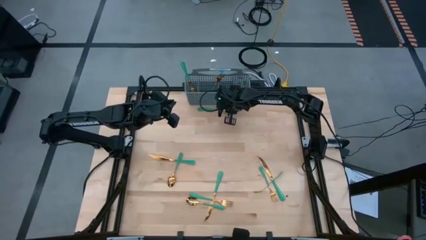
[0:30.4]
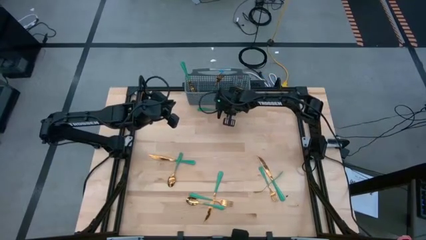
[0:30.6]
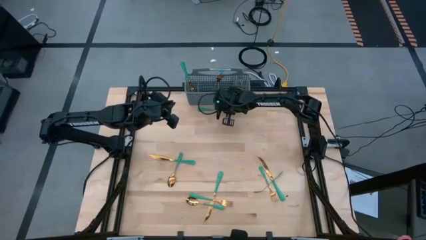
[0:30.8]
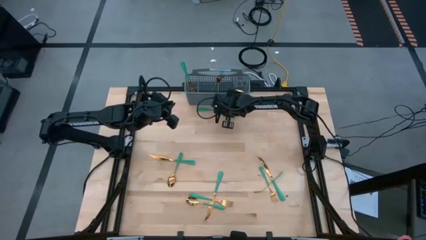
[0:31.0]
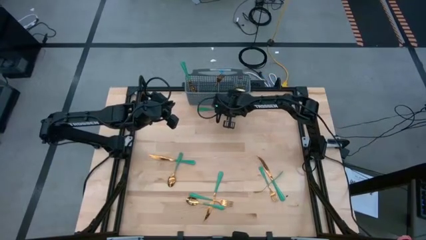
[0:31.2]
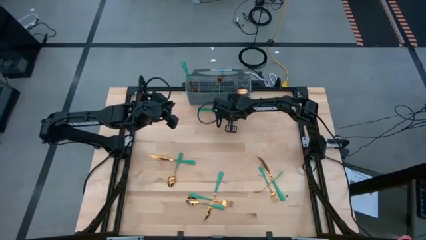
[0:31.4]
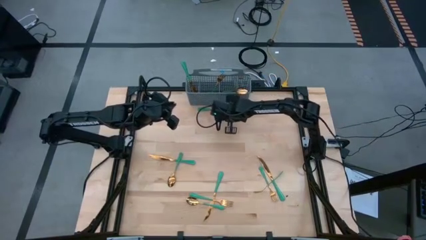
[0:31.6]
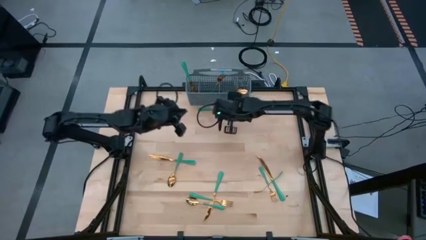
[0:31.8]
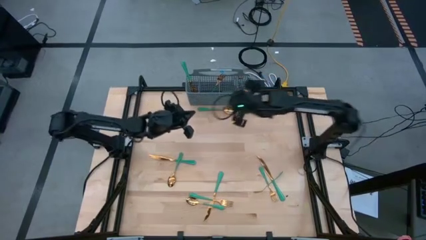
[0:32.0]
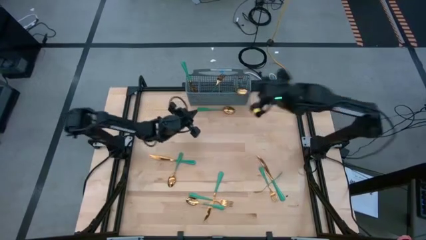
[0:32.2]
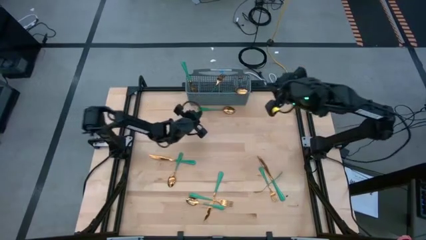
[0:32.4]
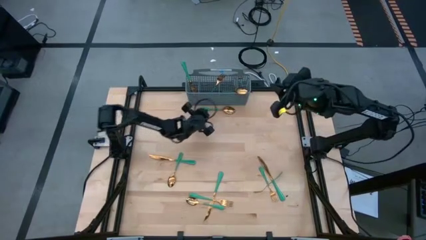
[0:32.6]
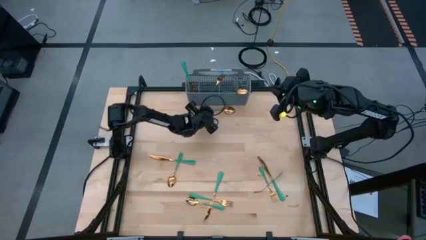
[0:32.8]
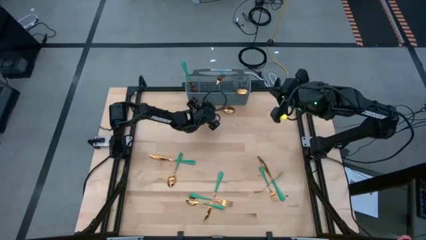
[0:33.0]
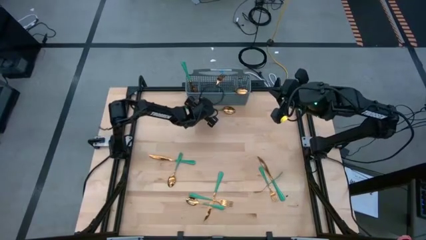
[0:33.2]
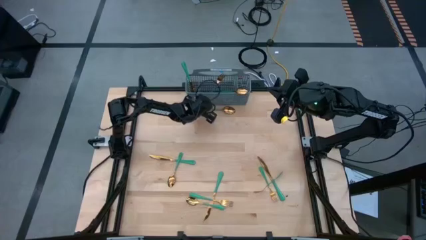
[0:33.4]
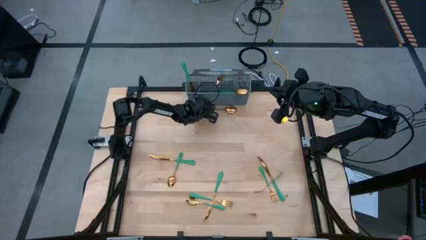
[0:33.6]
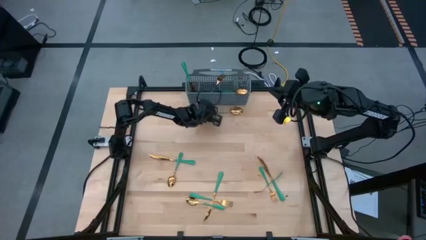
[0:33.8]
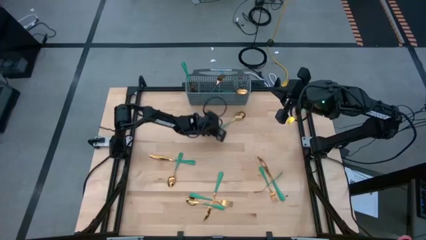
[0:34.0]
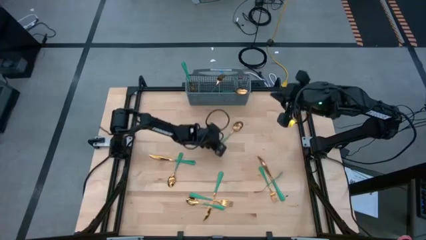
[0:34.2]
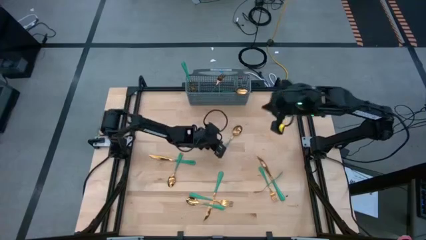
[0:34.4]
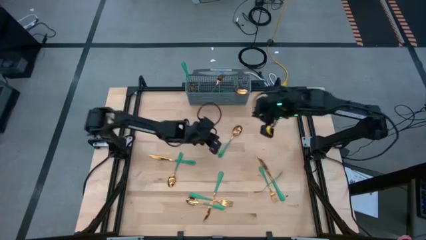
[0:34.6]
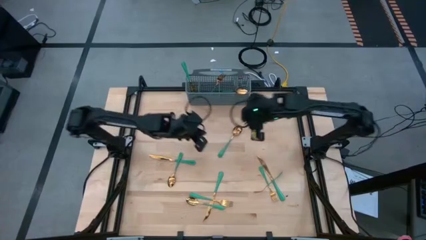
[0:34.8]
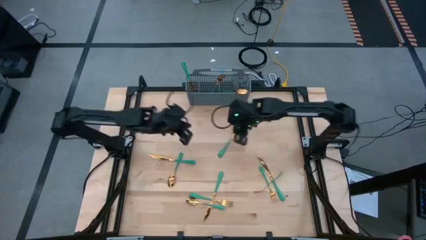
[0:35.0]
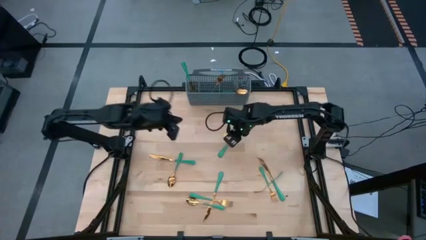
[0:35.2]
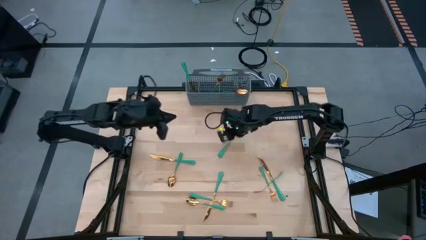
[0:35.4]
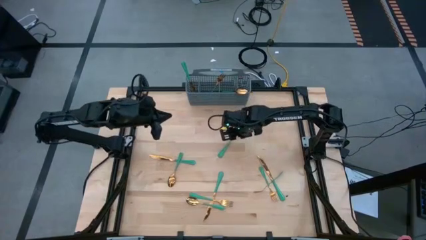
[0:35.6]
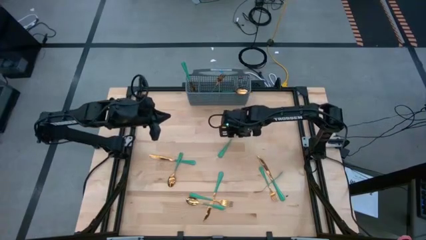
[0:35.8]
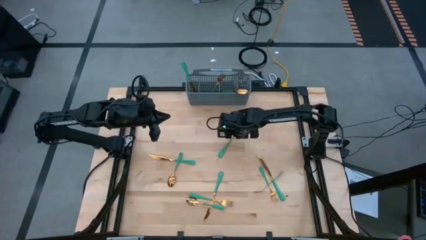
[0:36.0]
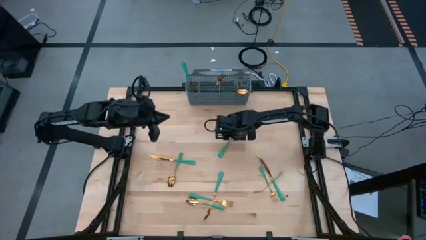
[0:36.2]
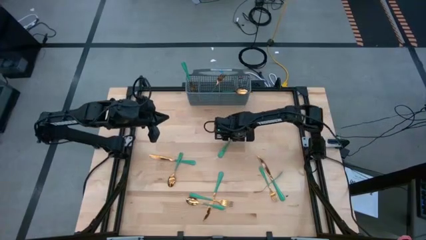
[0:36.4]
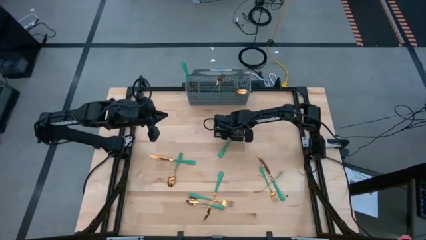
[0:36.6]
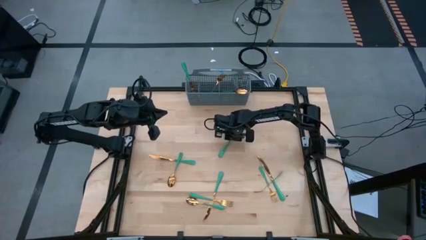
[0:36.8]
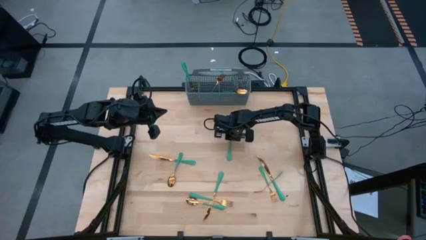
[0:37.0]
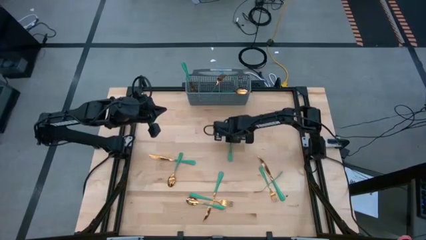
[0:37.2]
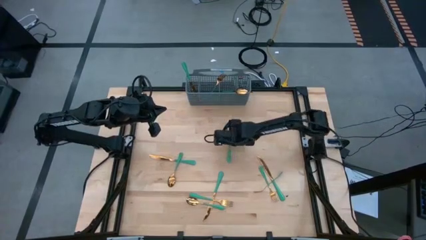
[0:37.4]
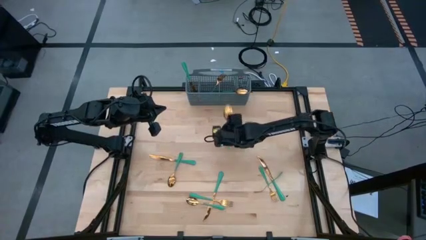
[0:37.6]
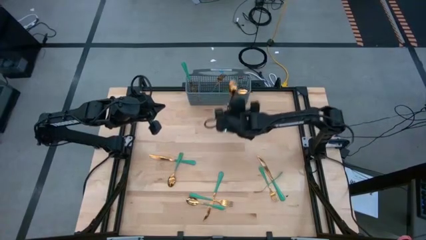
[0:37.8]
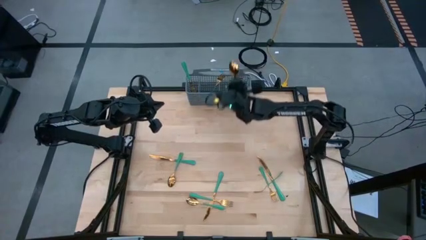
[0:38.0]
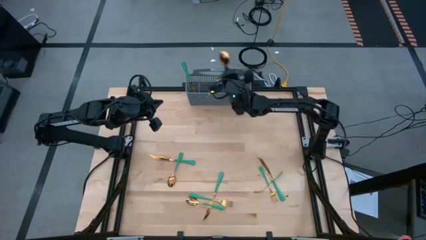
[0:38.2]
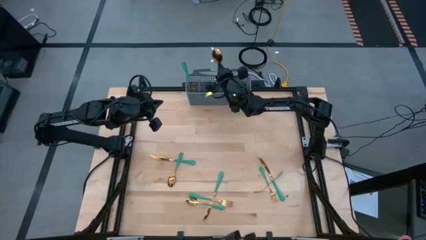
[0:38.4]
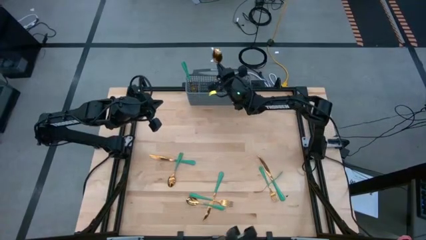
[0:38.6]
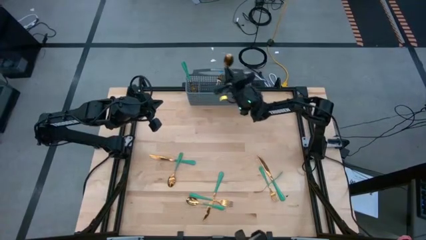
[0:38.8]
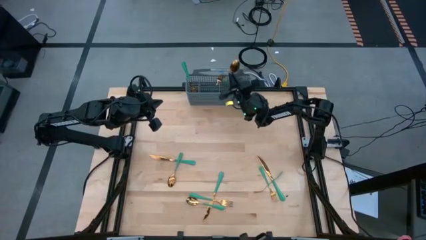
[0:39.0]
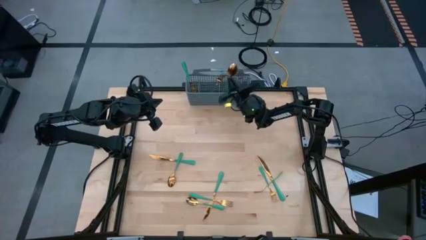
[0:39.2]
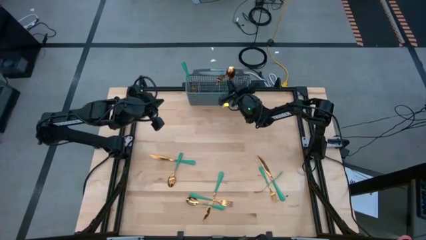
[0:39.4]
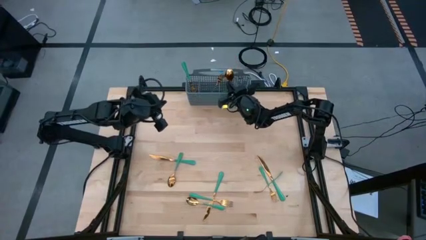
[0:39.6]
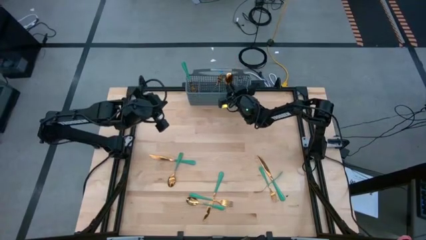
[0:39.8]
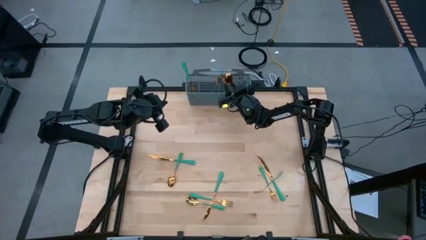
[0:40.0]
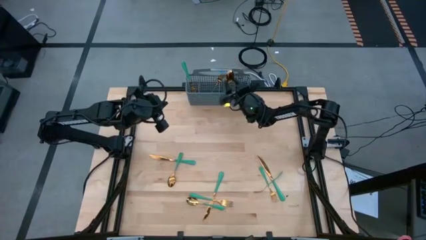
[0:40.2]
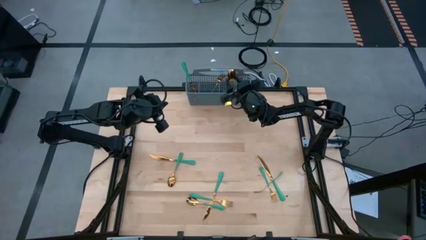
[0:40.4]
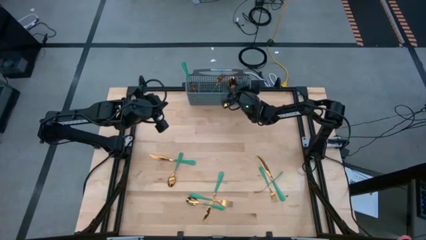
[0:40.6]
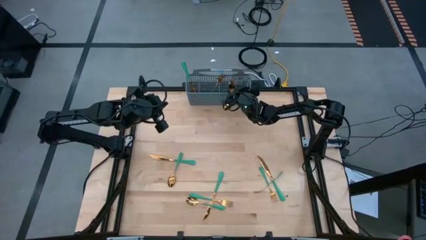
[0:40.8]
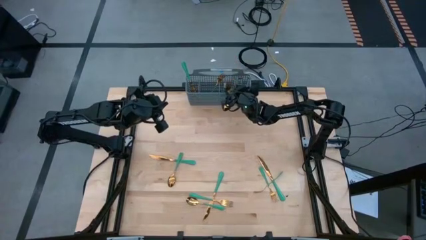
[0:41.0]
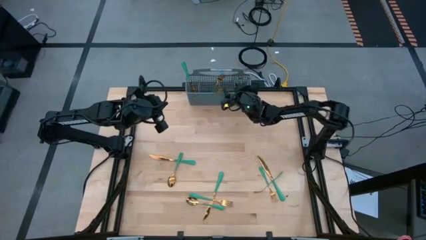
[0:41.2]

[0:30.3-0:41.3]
Task: Sort silverware
Put the green spoon into the gray silverware organizer

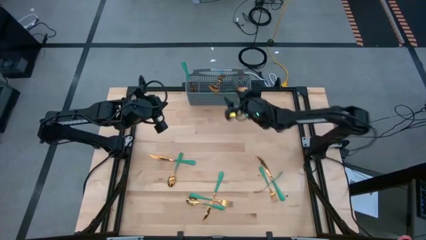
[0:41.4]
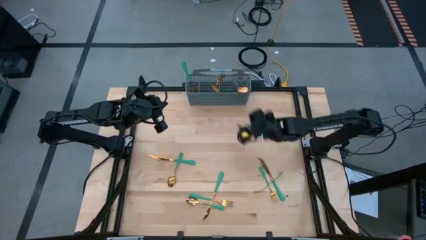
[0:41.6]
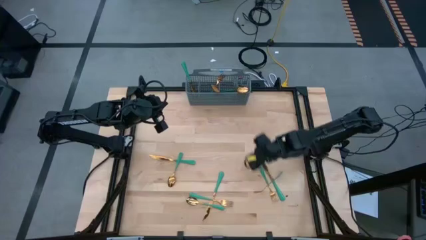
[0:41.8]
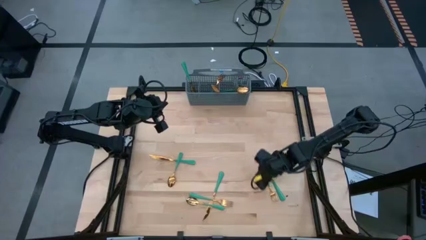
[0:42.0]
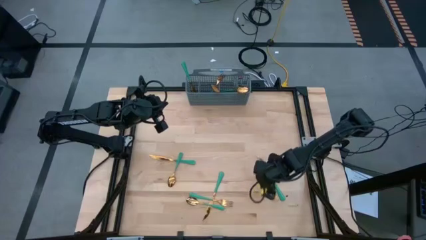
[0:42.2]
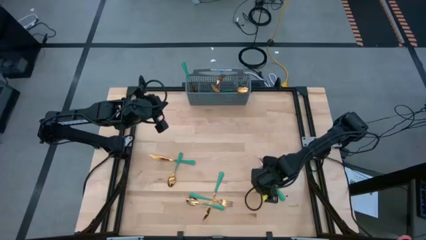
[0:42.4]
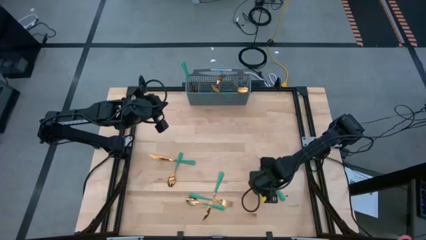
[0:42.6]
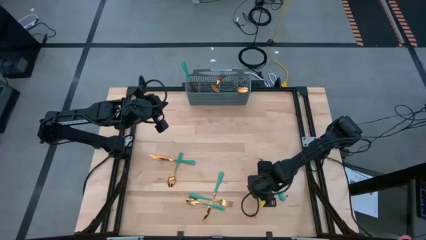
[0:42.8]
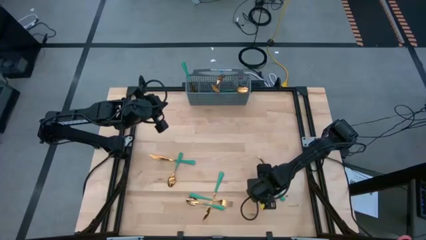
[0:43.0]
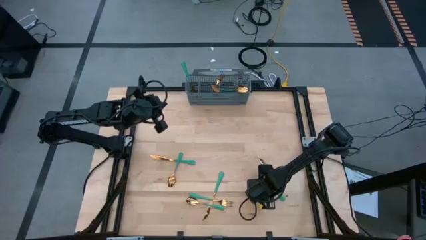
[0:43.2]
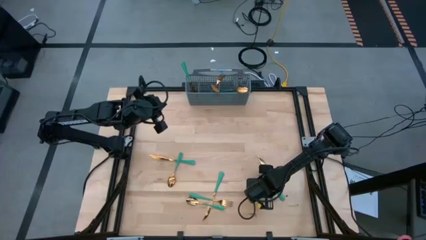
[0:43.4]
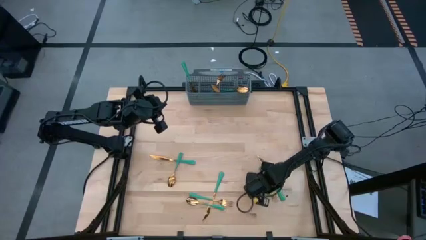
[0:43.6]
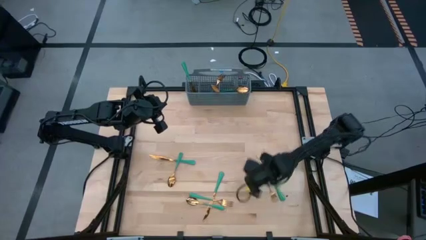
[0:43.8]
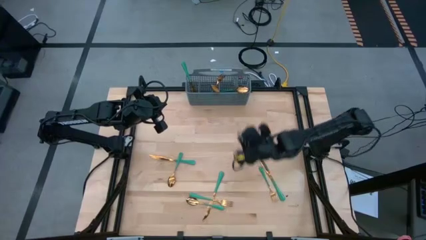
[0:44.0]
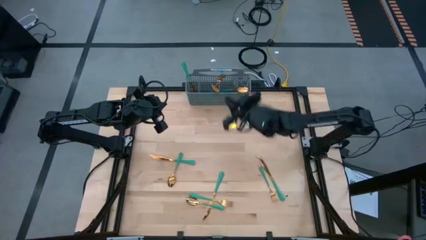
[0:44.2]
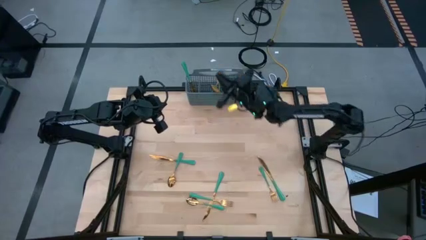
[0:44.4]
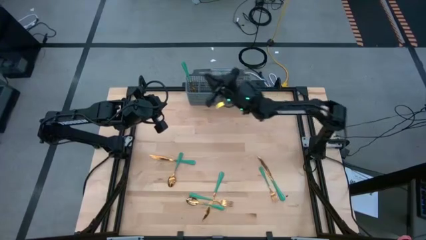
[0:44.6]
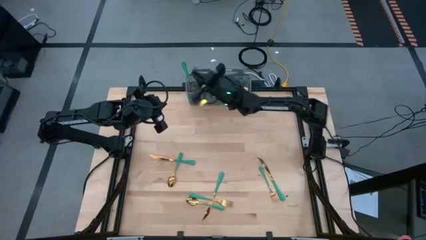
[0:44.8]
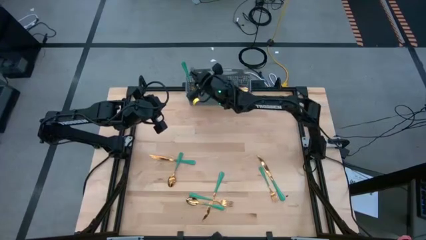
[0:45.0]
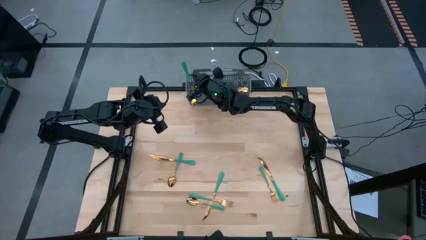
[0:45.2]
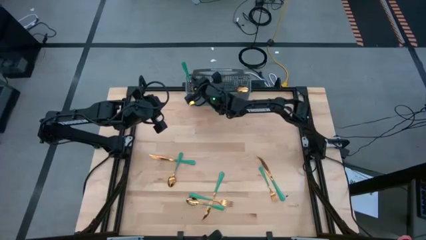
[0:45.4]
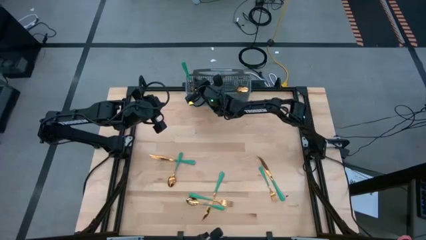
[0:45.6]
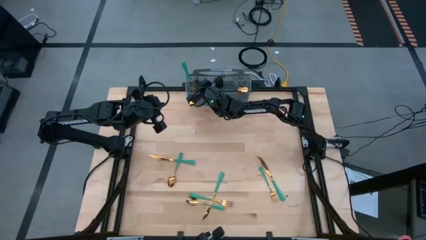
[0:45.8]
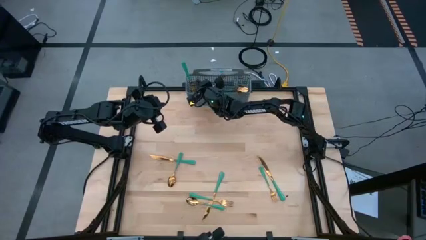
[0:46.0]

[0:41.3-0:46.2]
Put the green fork into the gray silverware organizer

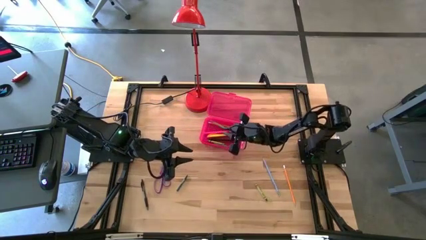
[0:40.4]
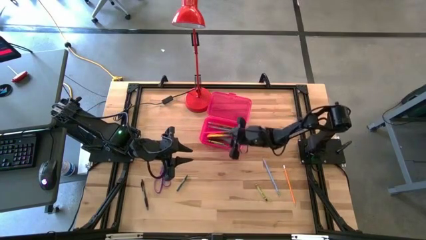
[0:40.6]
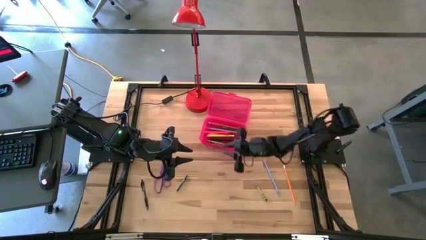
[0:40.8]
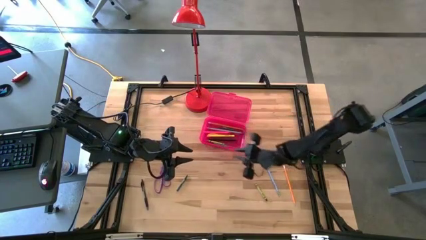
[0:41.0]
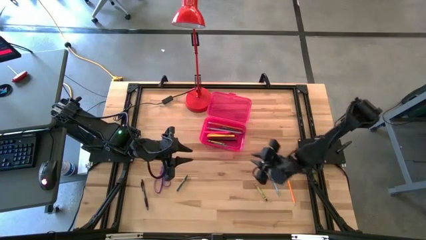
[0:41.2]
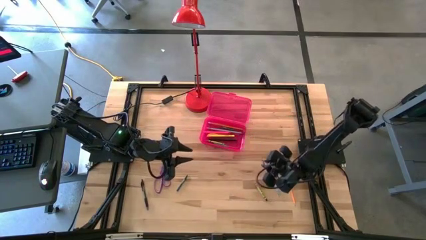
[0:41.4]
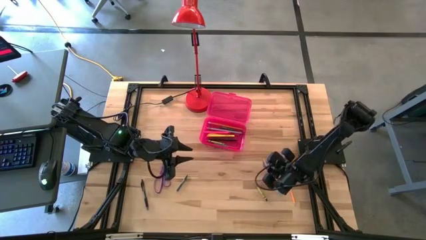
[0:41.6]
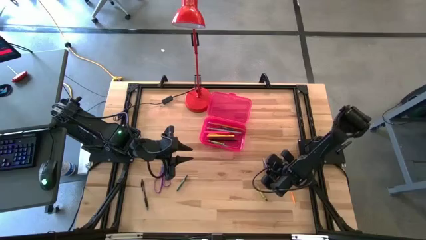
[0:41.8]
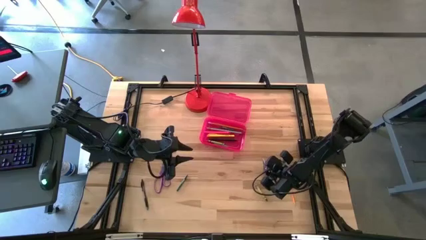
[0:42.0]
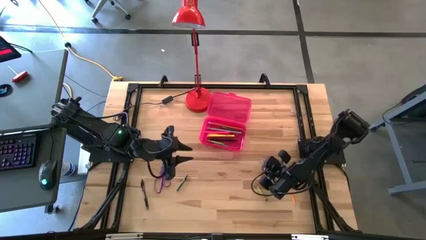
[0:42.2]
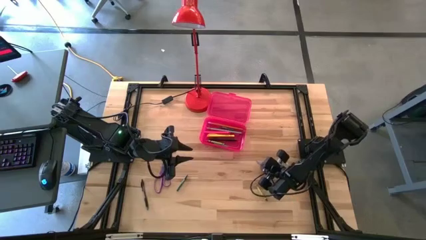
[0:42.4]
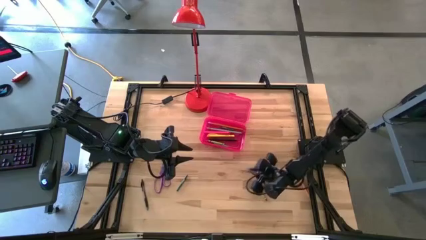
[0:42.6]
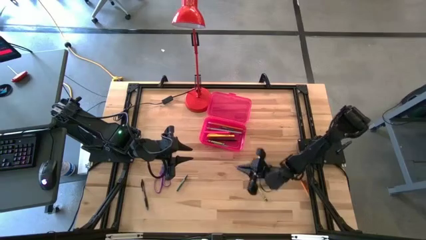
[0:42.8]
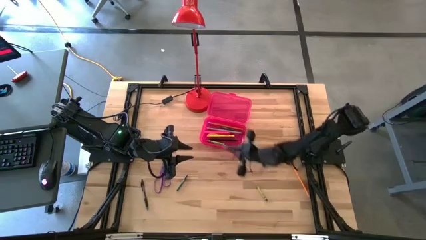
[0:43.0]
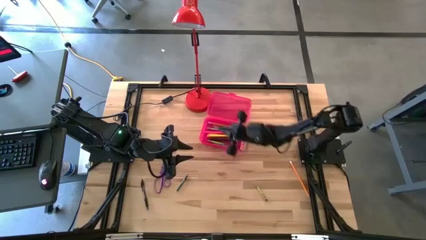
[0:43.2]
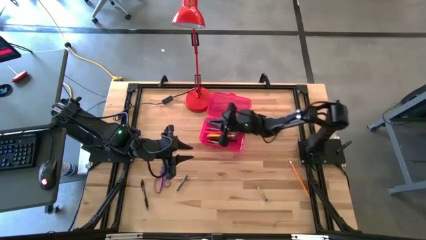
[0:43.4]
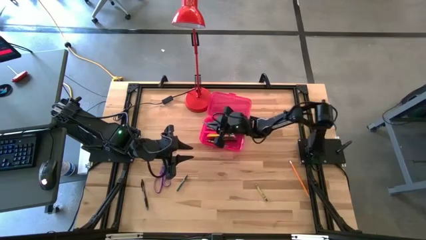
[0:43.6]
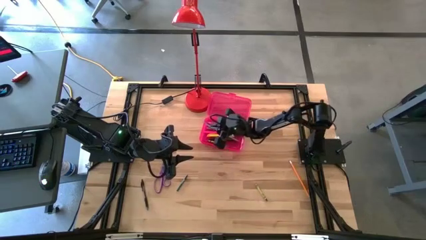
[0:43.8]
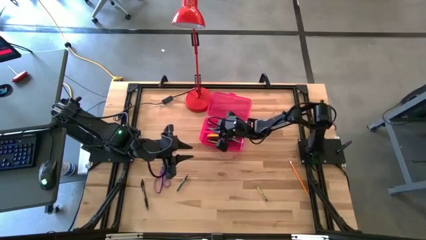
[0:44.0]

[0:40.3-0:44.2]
Task: Pick & place school supplies into a supply box
Put the purple pencil into the pink supply box
